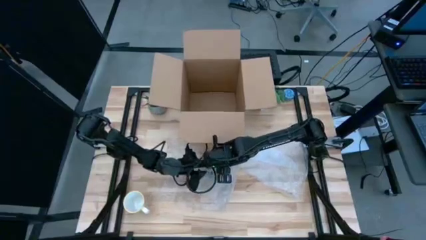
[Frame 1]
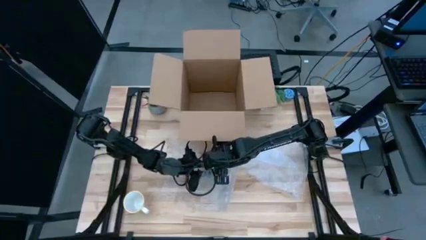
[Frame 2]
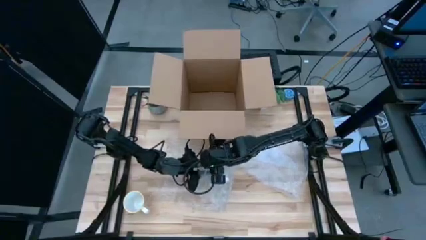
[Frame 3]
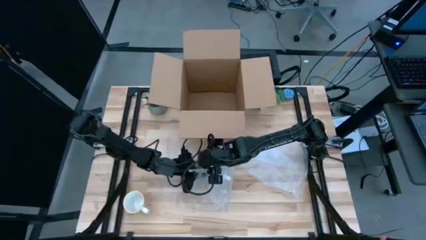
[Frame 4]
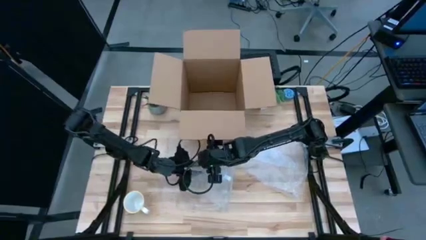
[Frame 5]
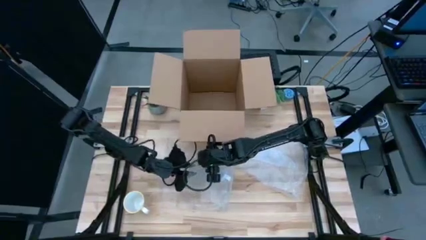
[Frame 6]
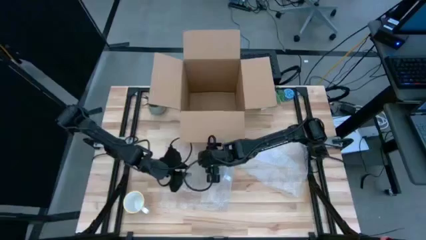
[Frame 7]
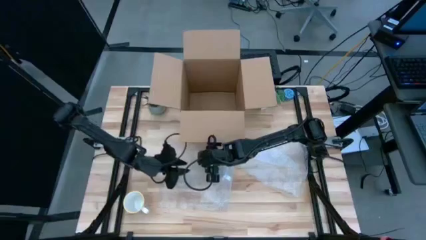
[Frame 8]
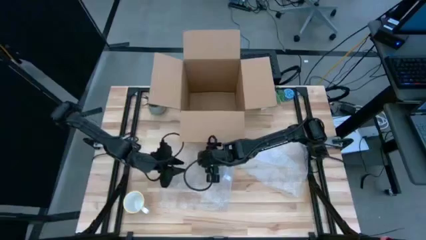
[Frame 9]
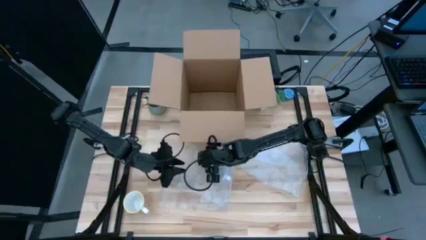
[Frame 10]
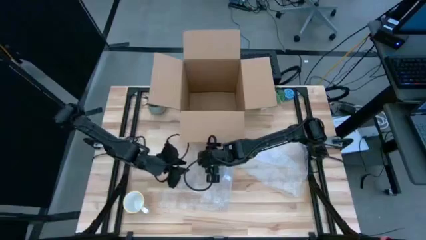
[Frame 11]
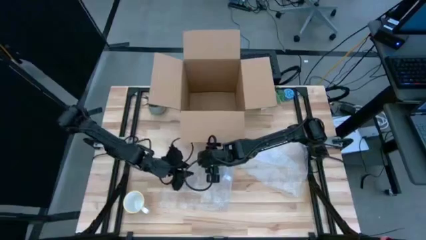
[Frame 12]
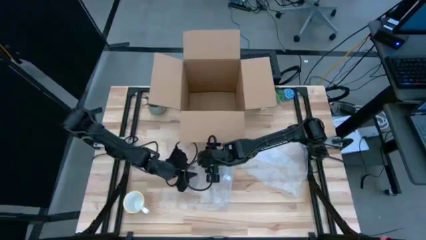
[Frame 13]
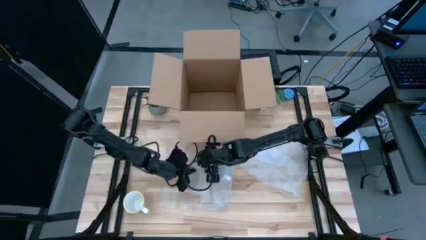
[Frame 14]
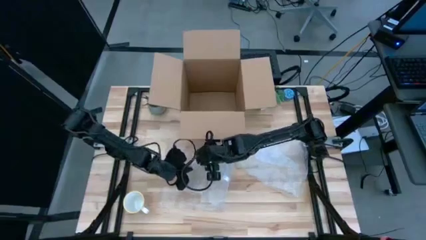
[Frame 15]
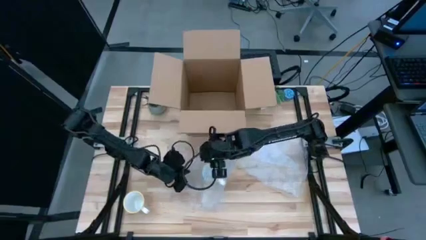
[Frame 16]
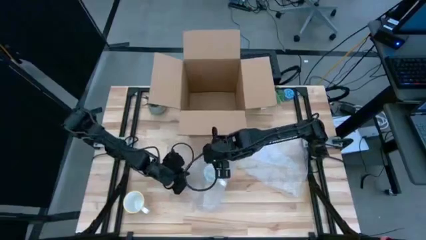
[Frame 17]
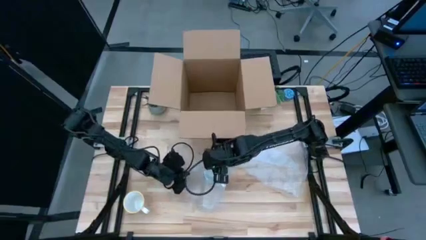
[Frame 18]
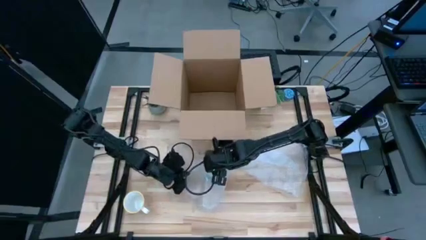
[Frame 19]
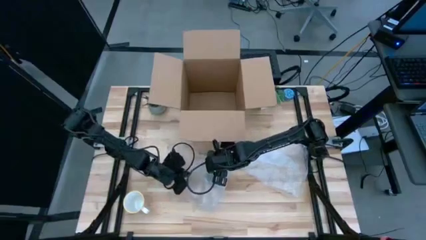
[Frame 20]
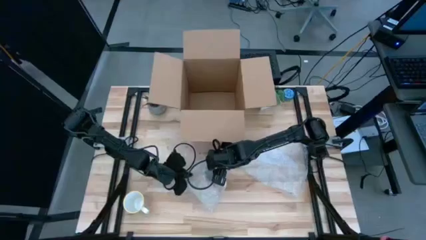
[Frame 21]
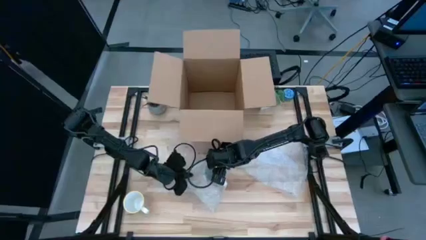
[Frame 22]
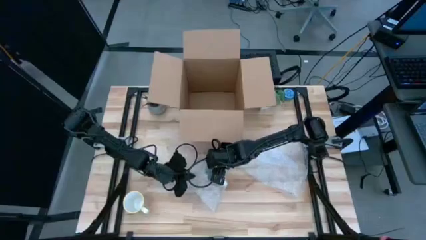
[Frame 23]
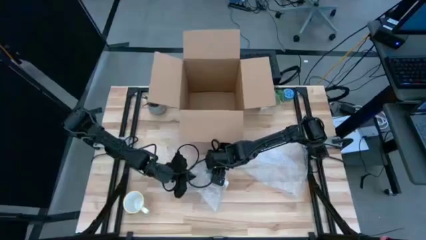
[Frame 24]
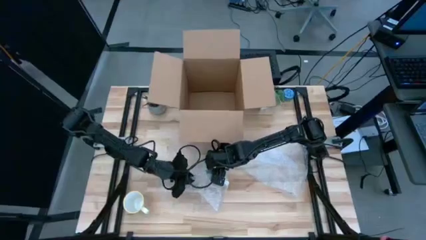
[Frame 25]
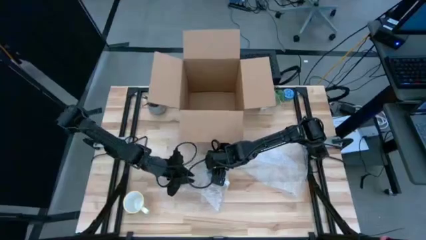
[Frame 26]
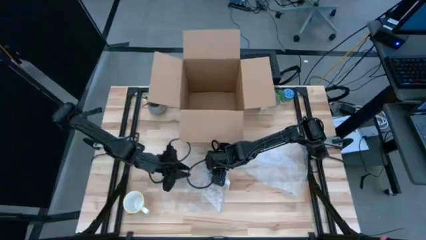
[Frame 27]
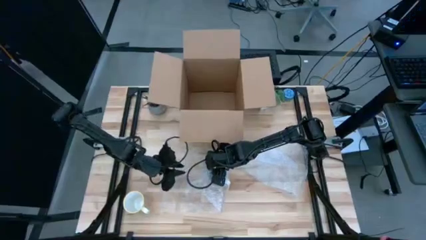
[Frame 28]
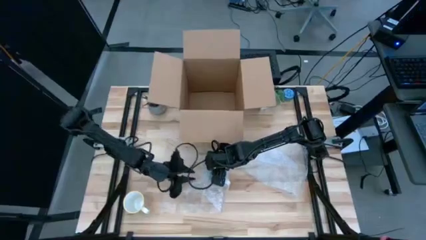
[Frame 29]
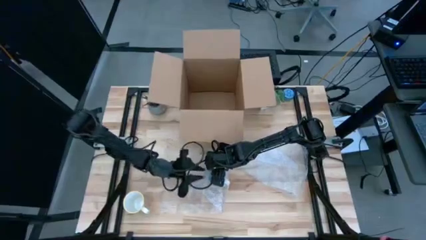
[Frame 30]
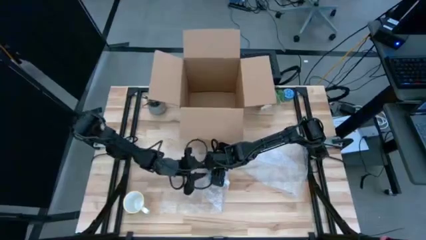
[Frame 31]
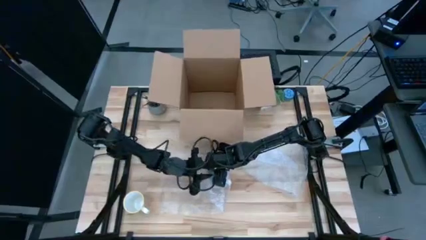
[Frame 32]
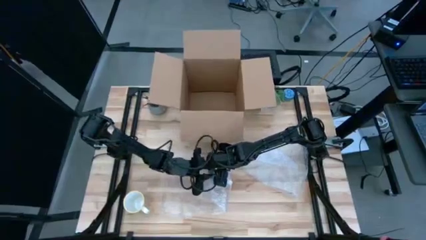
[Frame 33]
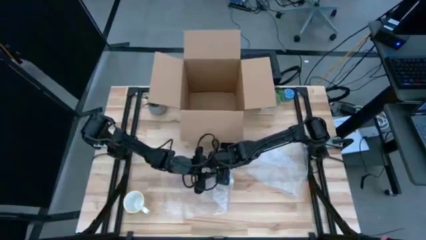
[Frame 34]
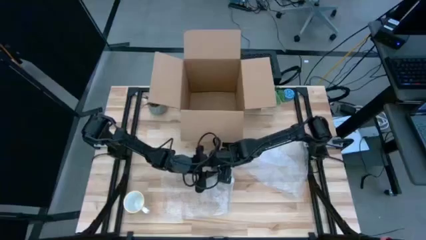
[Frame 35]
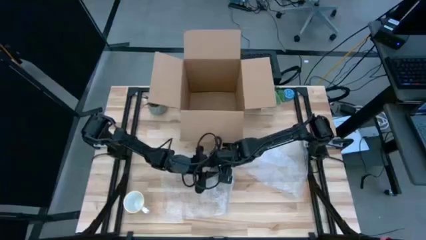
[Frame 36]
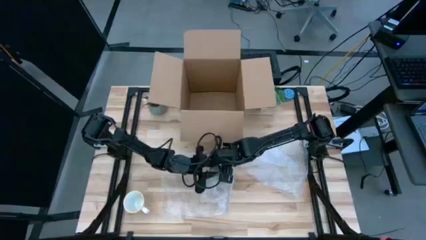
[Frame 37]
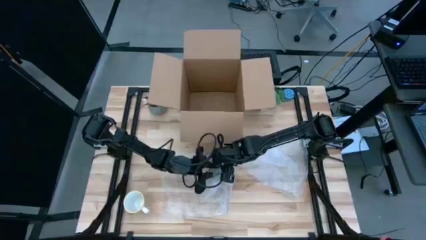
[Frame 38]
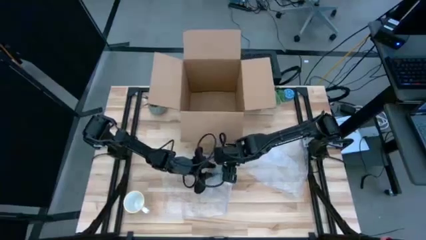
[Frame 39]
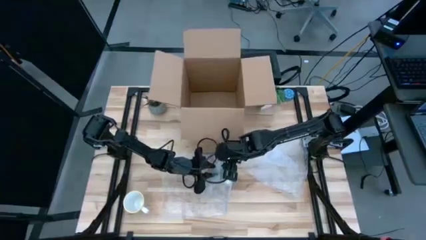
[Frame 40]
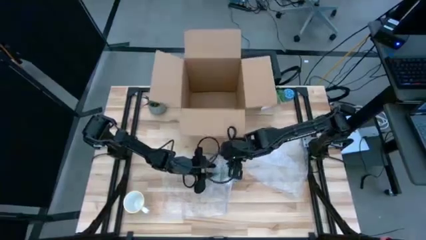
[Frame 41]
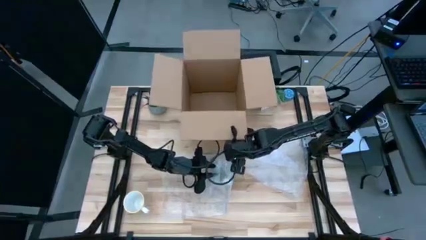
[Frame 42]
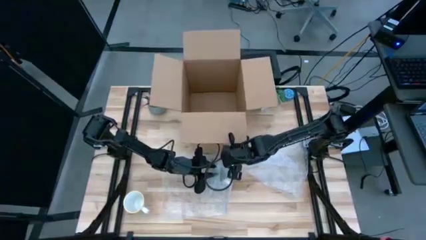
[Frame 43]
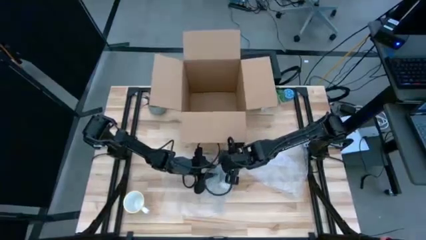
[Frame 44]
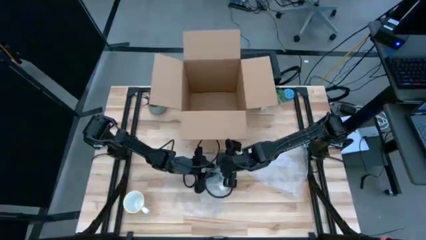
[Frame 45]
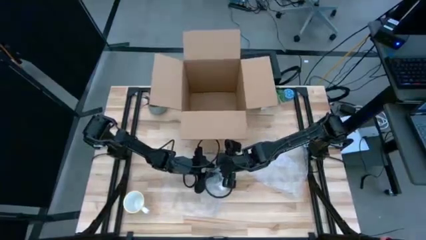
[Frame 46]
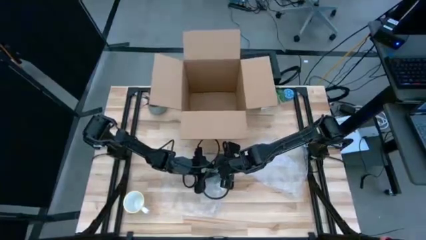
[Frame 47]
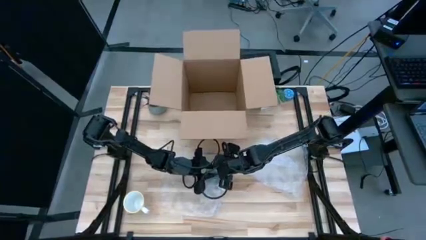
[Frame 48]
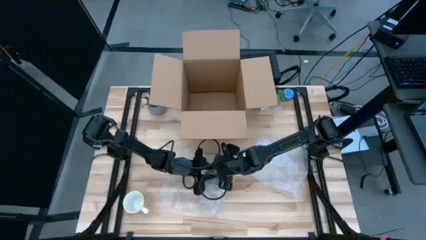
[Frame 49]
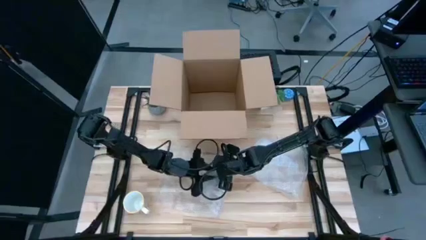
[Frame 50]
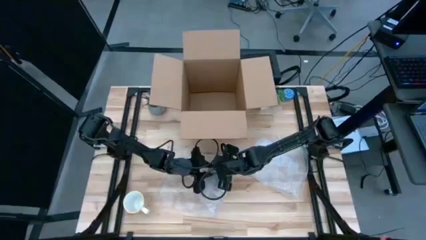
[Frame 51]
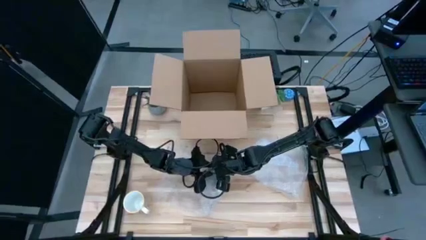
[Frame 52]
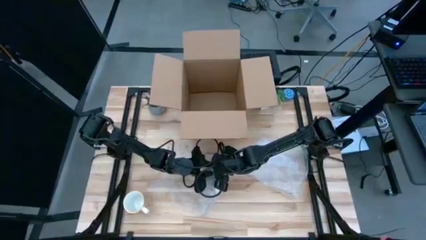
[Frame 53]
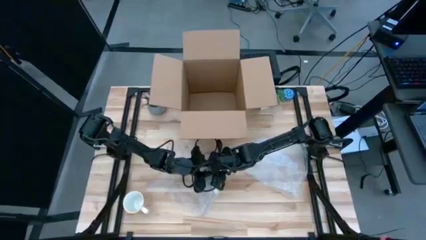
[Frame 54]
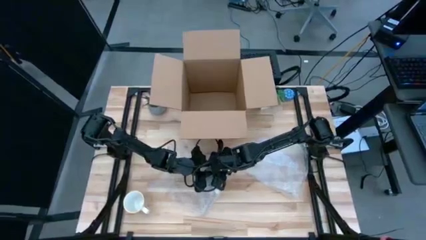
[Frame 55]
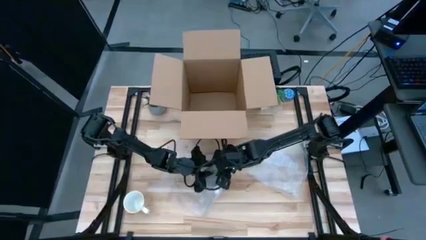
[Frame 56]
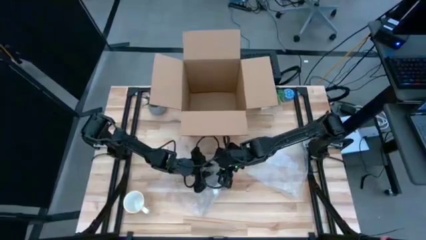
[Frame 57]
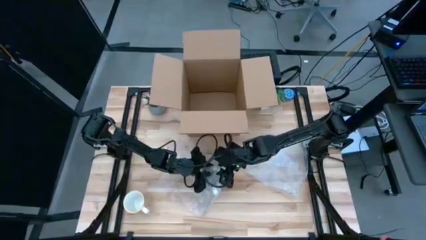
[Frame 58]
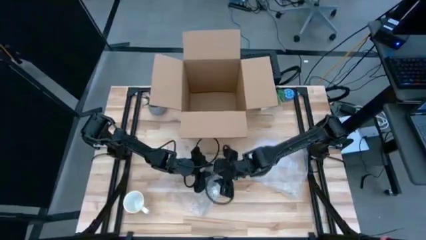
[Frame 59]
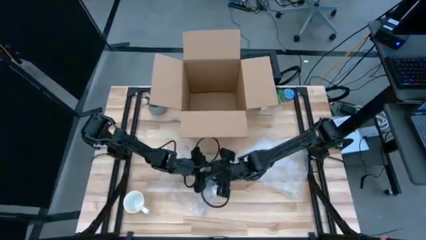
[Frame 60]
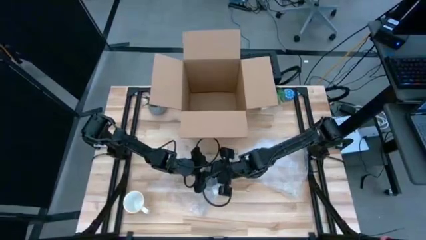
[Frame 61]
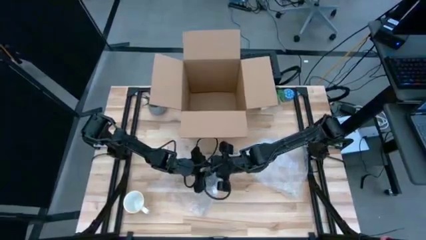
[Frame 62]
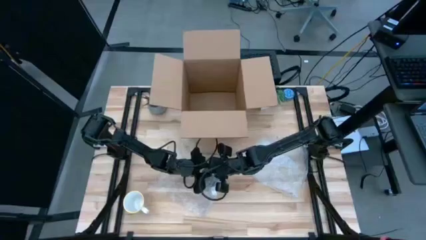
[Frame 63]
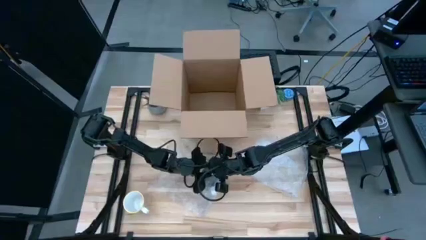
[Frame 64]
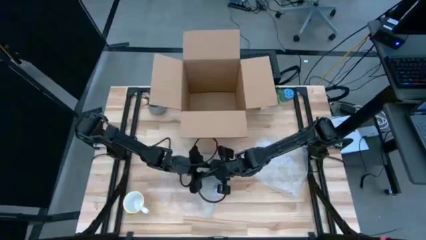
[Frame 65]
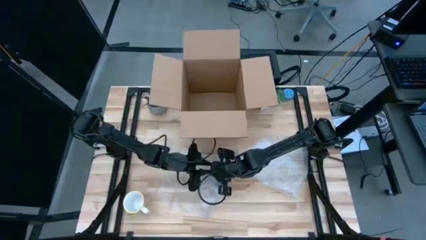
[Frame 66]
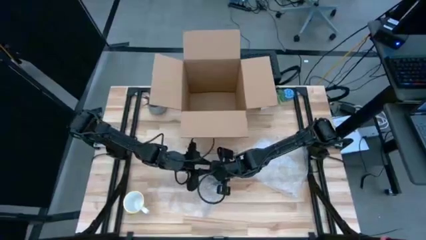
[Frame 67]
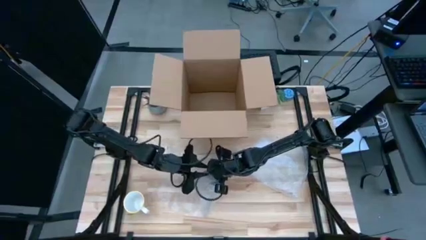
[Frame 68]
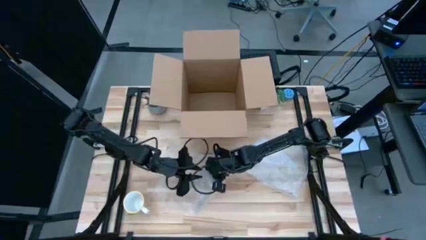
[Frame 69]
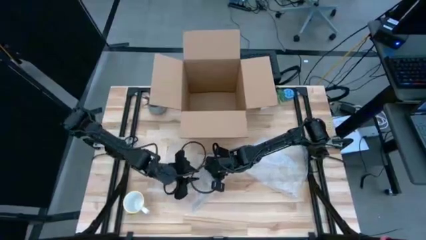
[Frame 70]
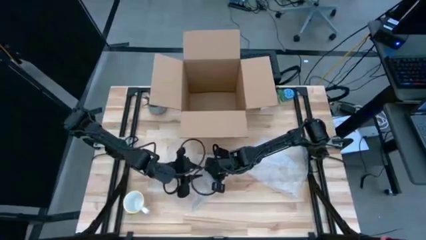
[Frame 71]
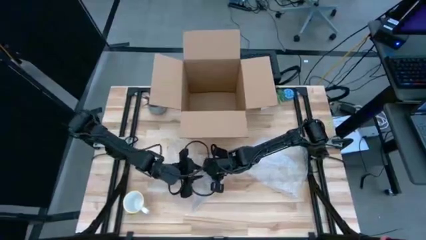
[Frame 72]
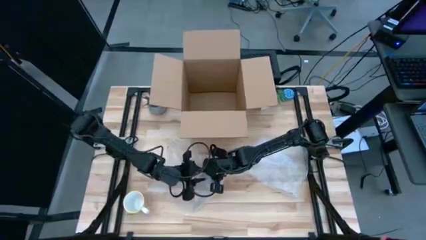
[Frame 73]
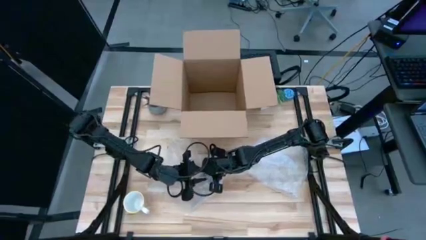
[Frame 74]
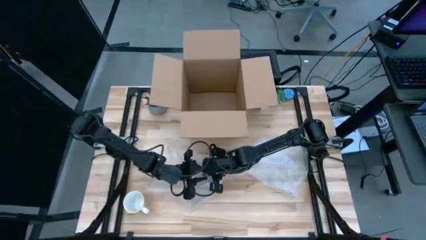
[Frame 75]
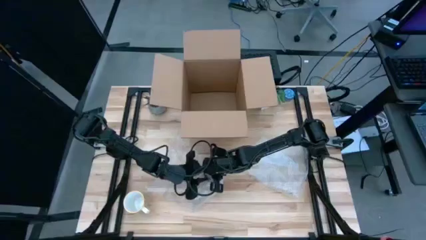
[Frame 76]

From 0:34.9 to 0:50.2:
Task: wrap mug
Wrap the red mug with the left bubble wrap

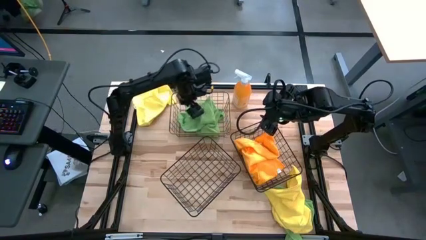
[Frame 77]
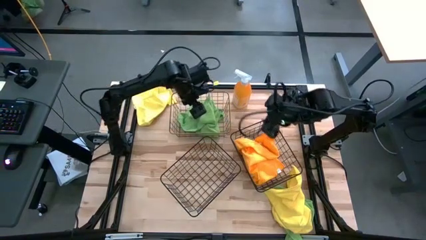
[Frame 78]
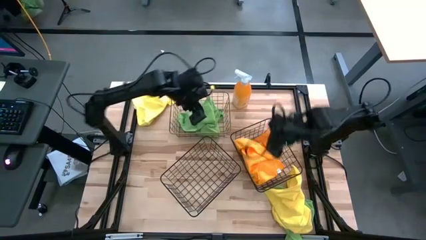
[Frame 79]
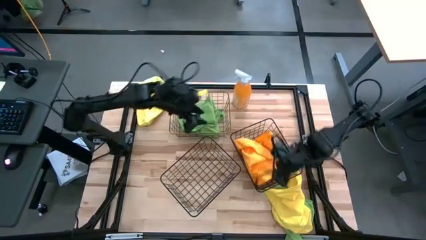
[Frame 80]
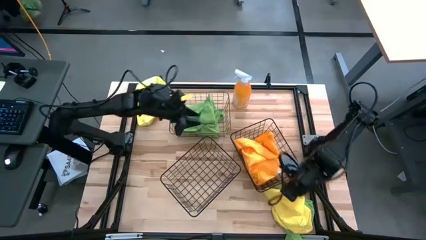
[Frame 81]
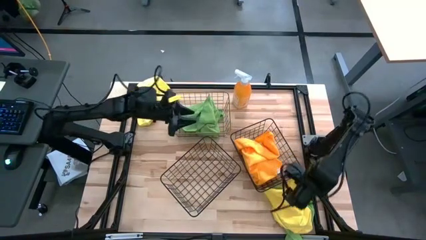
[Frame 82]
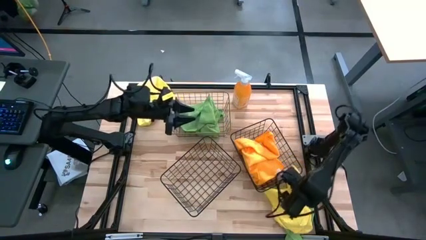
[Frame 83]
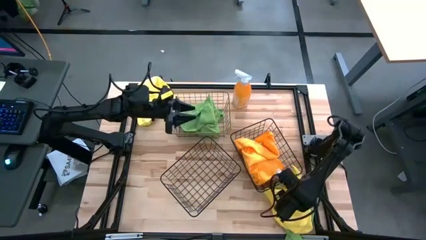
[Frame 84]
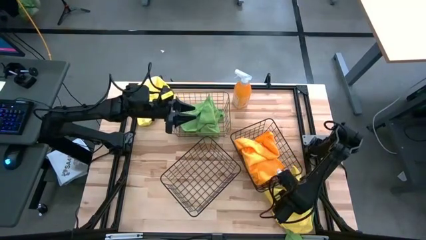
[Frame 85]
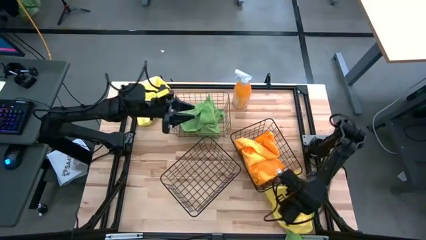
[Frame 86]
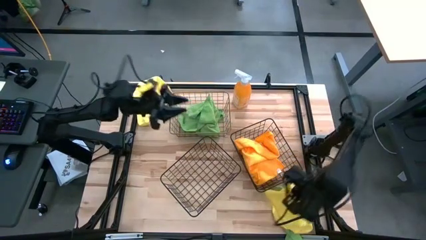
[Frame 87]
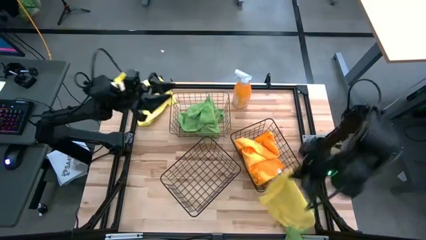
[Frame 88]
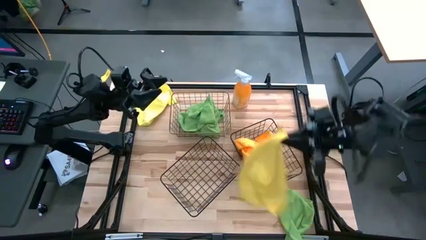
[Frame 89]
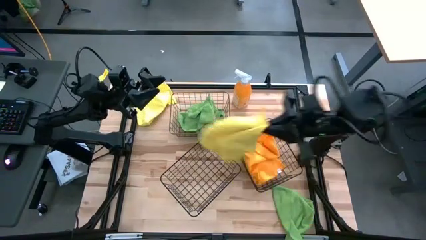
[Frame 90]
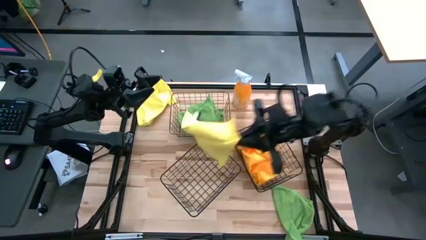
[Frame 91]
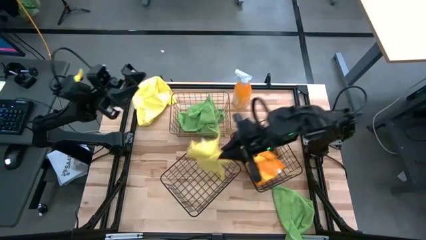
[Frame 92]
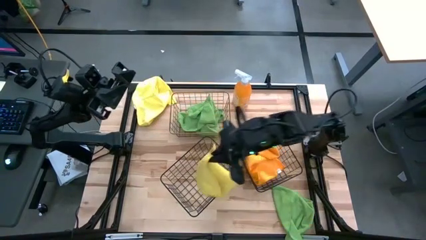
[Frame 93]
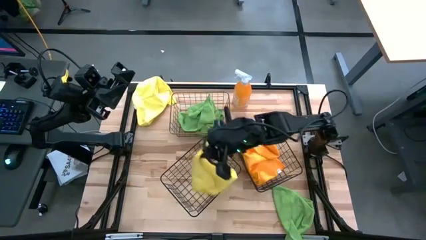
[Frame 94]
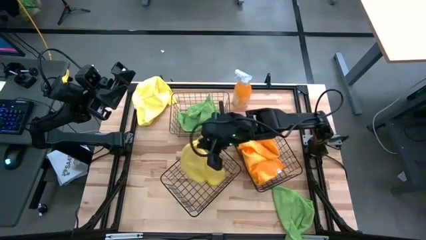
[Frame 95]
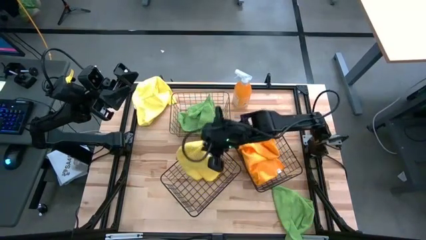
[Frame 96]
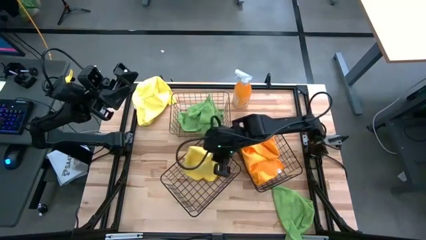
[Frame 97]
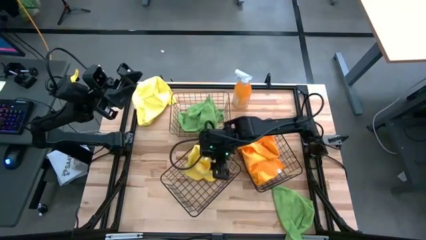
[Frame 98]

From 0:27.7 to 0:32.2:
Task: Sort microfiber towel by color & place in baskets
Put the bottom yellow microfiber cloth into the left wire basket
